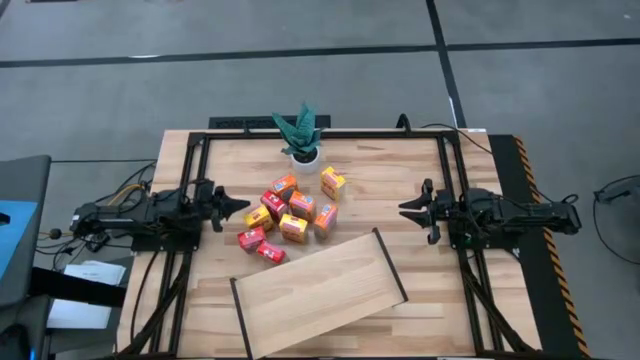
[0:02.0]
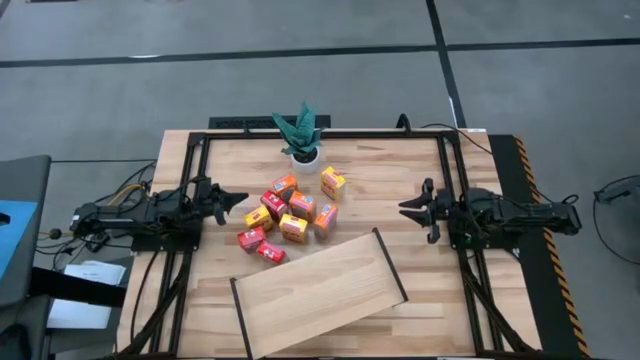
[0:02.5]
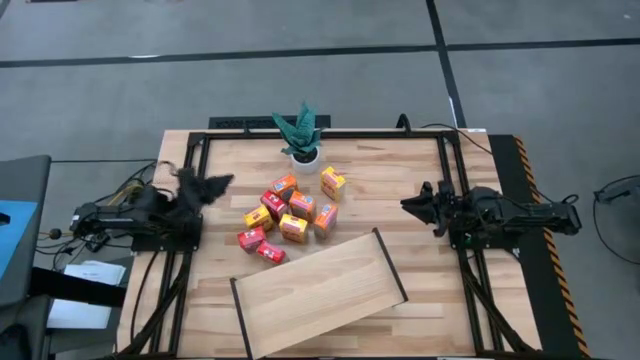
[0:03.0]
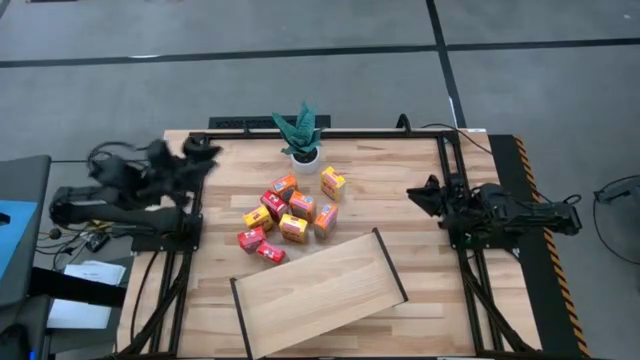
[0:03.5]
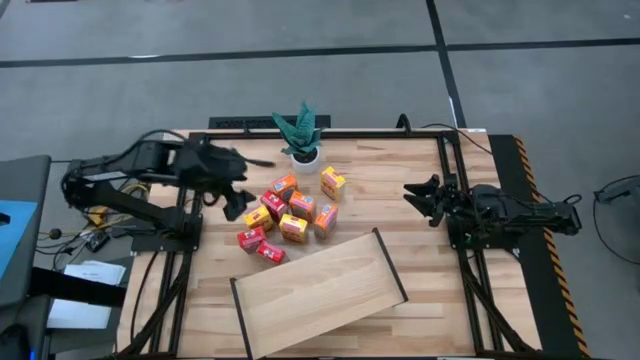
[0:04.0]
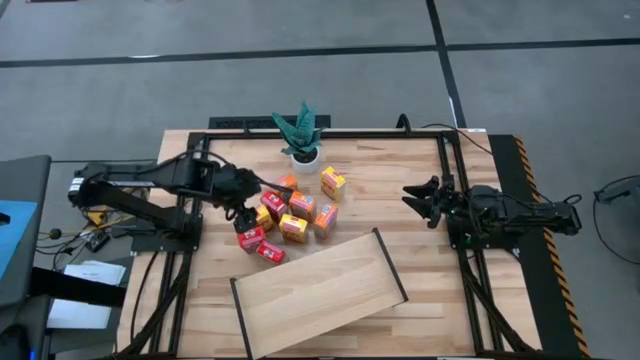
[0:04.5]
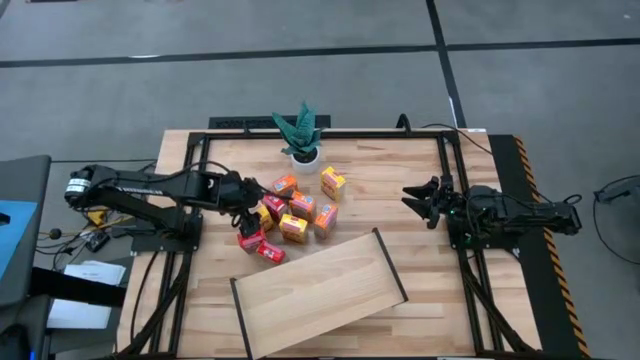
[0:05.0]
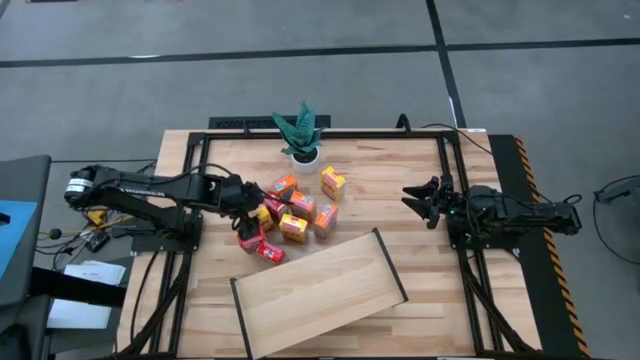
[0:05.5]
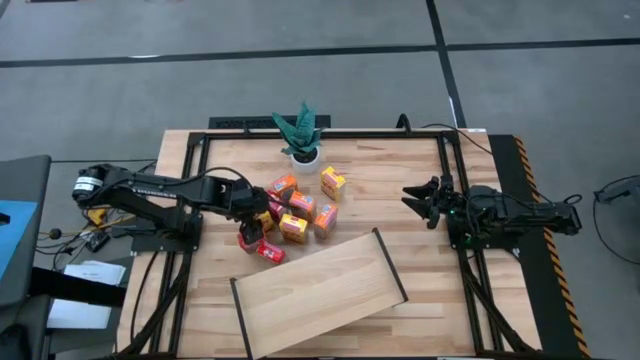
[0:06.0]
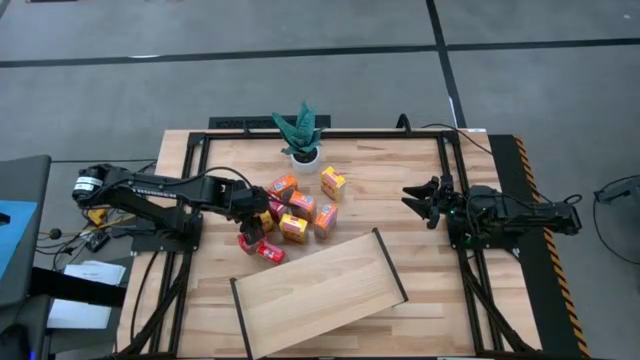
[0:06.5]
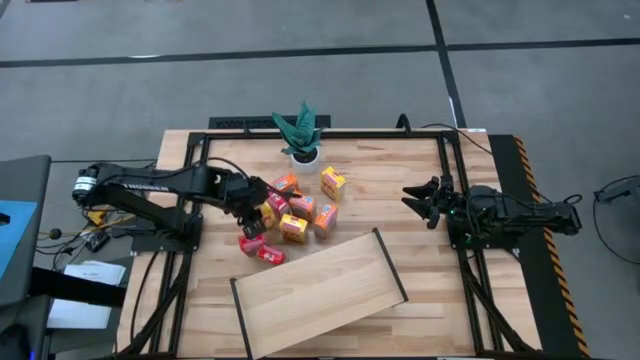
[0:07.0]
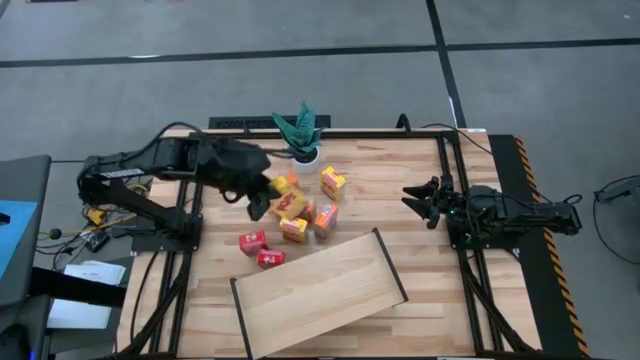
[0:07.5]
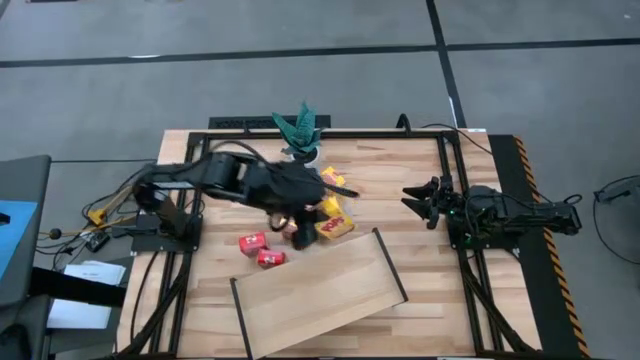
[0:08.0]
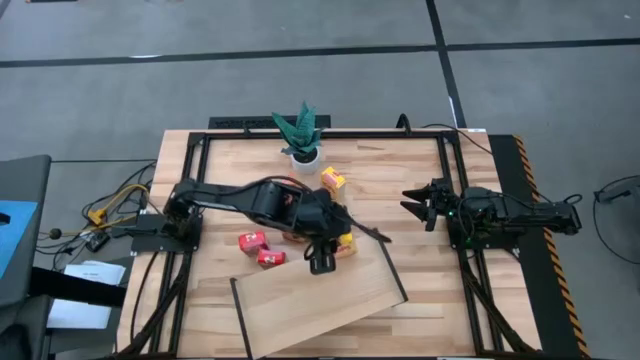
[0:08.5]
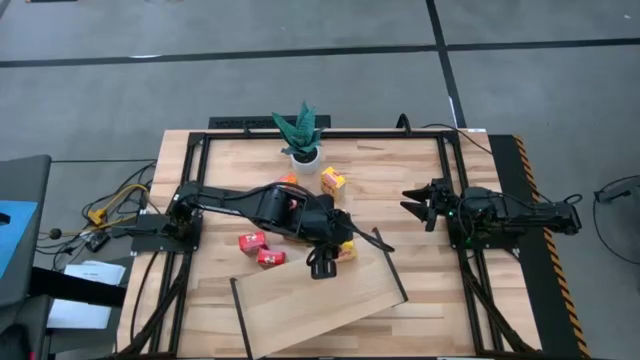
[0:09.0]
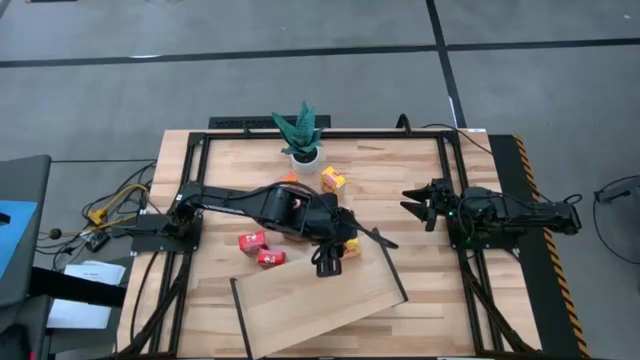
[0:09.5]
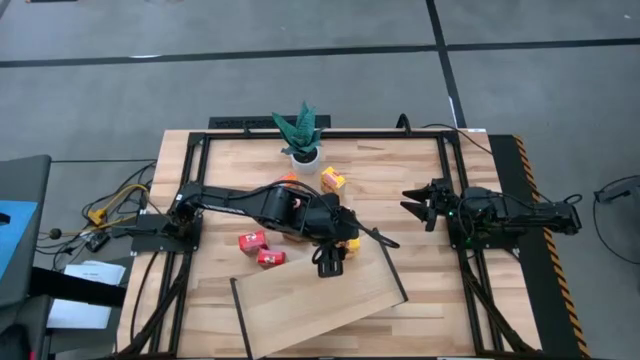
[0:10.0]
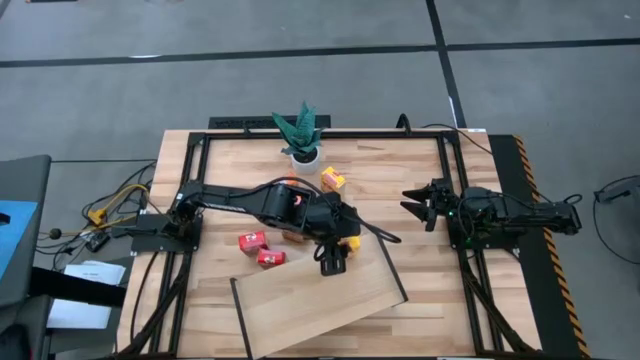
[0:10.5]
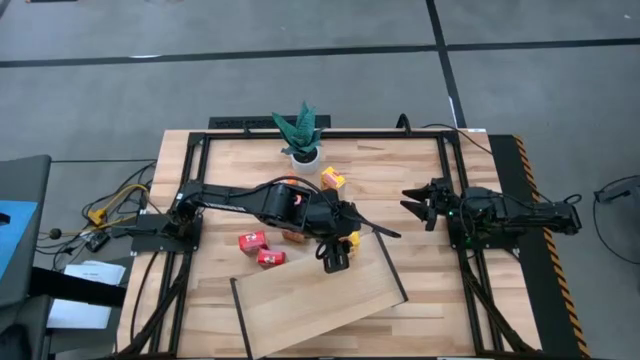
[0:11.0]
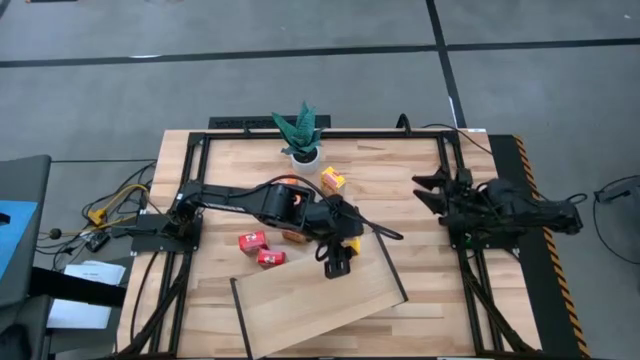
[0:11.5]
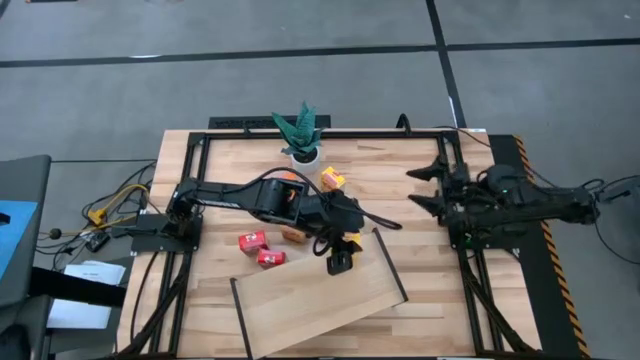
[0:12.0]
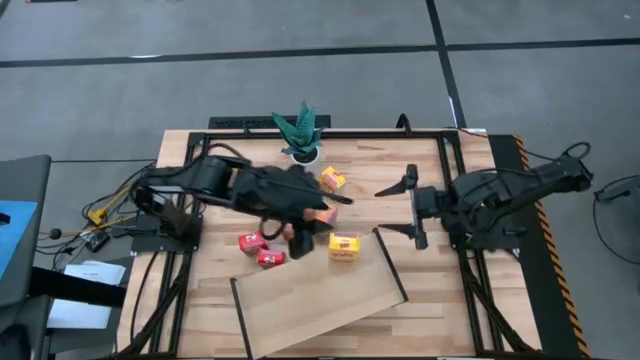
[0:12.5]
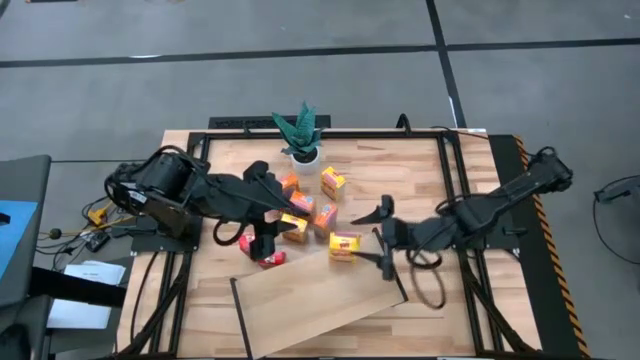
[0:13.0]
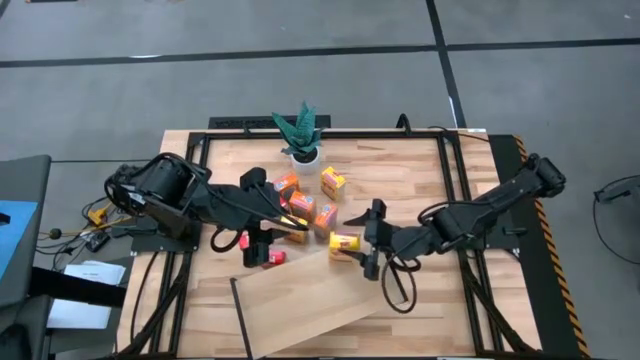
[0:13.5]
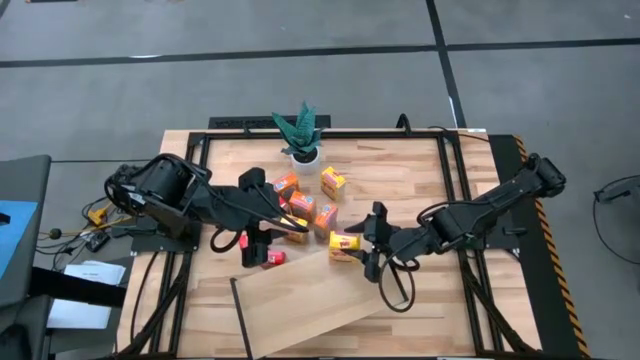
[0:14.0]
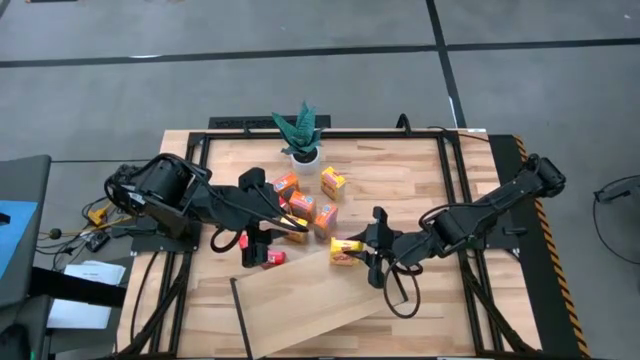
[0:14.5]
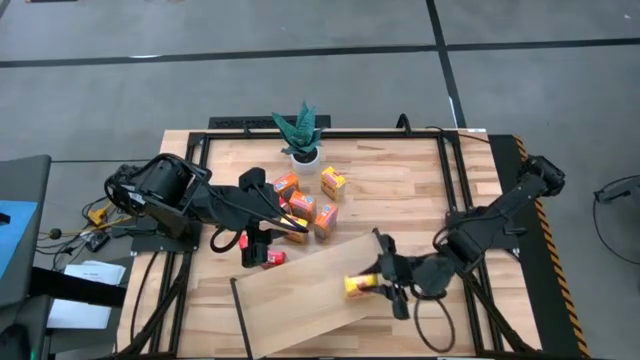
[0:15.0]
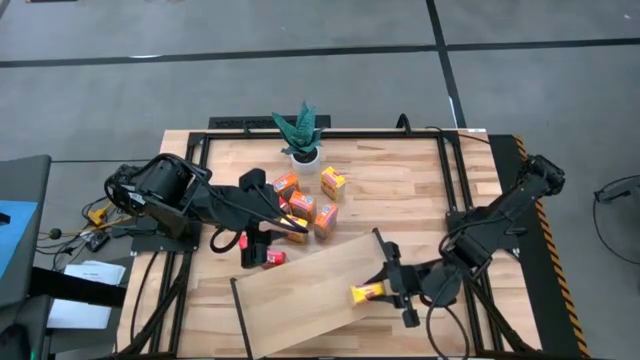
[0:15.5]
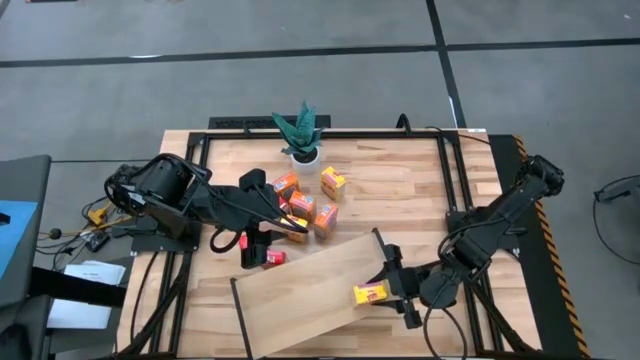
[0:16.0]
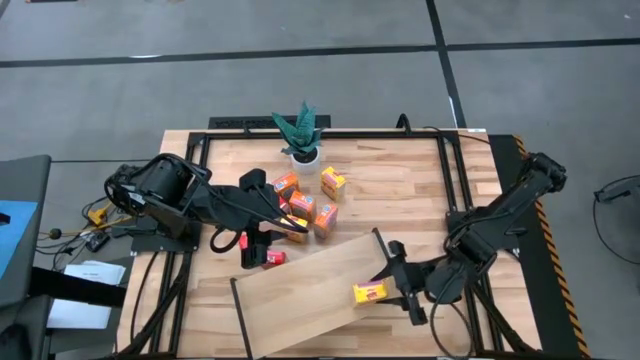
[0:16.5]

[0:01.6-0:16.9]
Task: Stack cereal on shelf
Put the bottom left yellow cereal box on the shelf

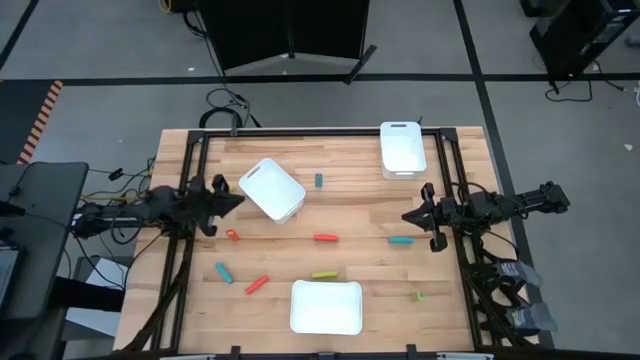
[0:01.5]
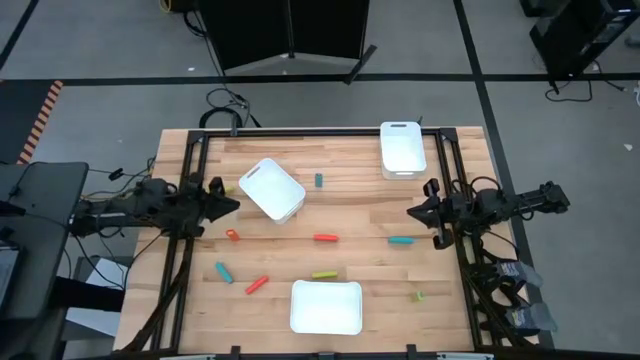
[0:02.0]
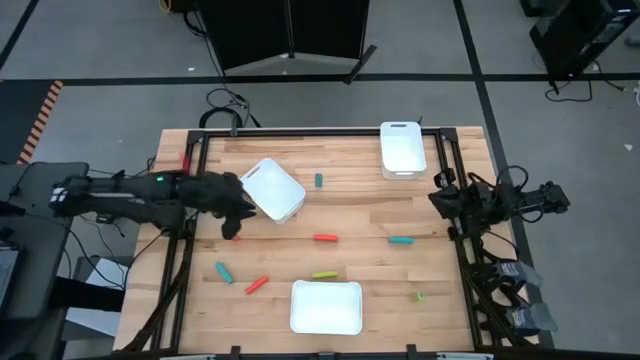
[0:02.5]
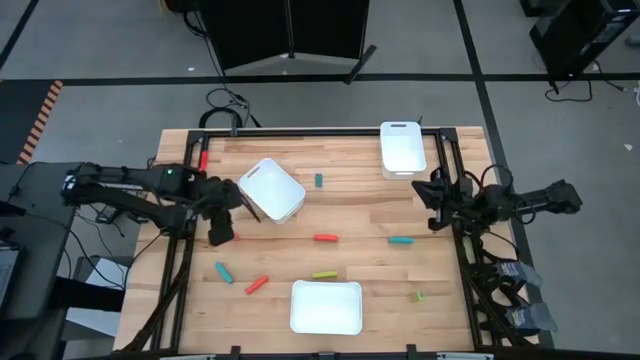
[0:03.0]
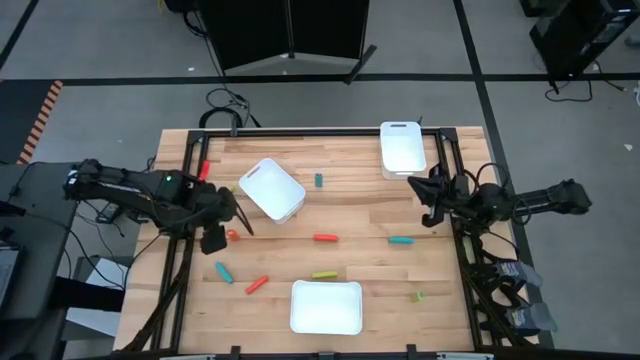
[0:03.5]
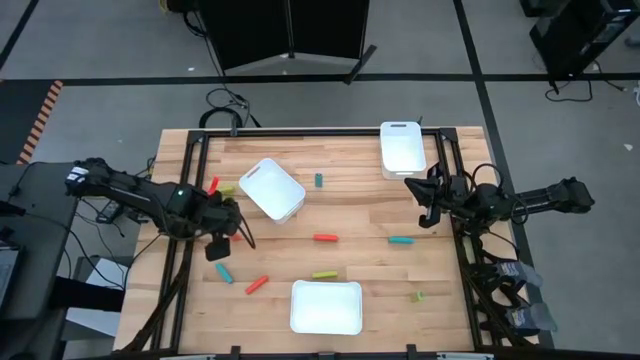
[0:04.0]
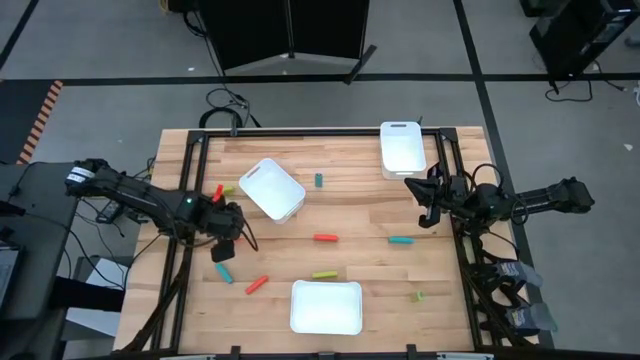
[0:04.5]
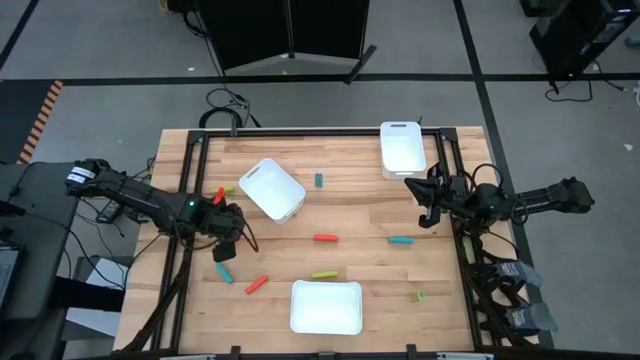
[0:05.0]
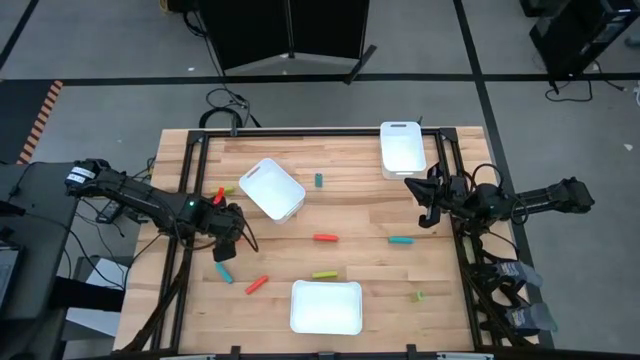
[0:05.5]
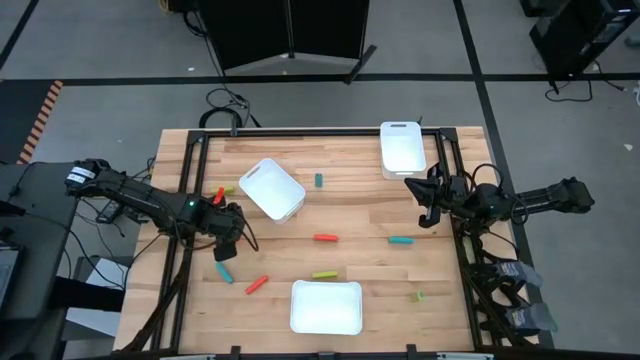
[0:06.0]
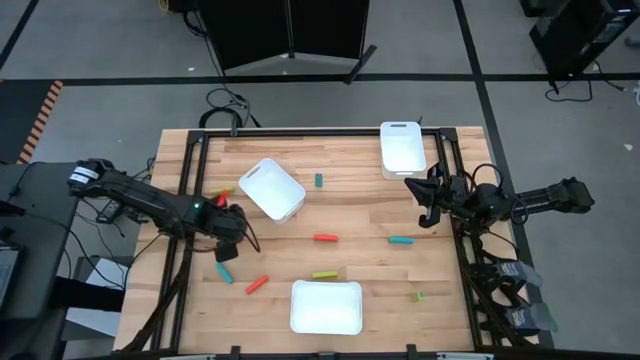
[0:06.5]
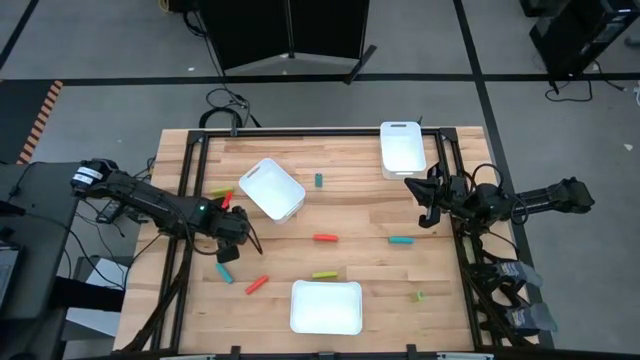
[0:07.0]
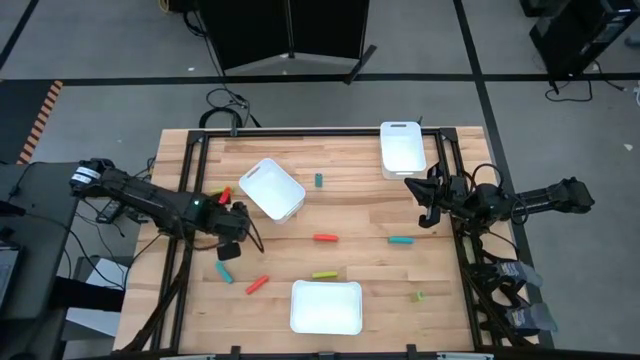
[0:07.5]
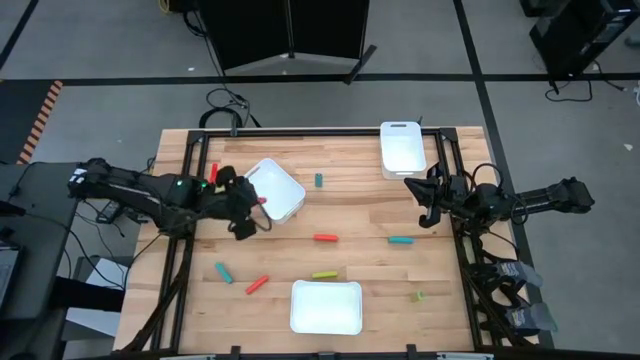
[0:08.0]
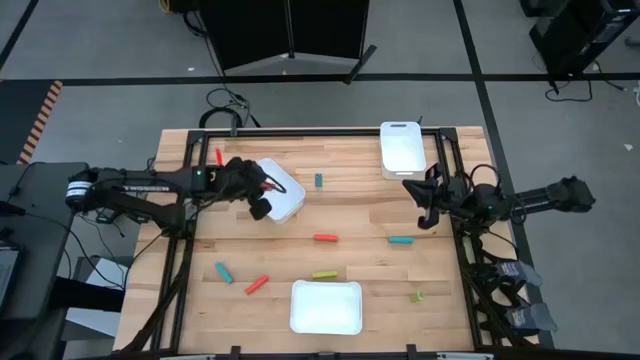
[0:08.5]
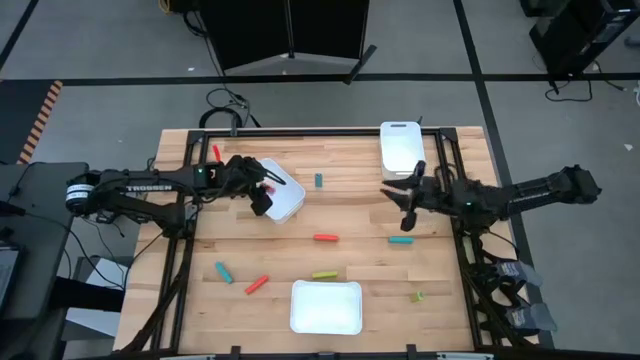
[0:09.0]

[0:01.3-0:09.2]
Task: Sort blocks
Put the top left orange block into the top left bin
